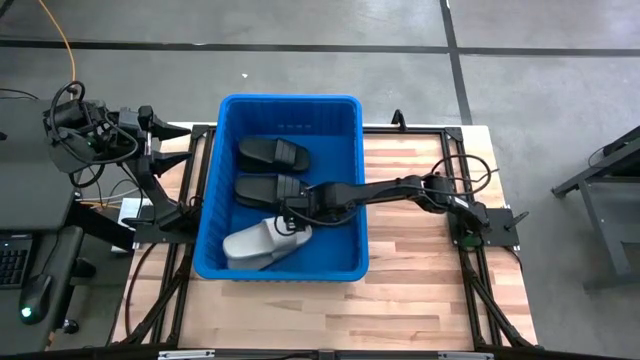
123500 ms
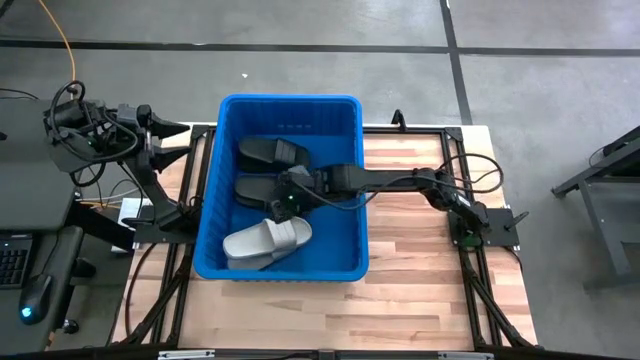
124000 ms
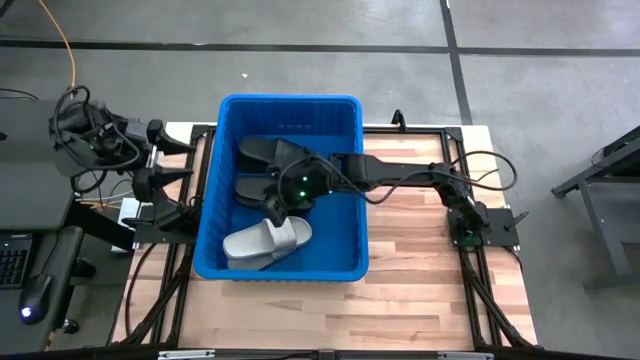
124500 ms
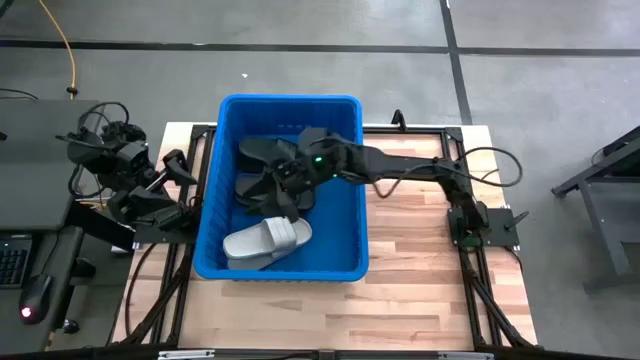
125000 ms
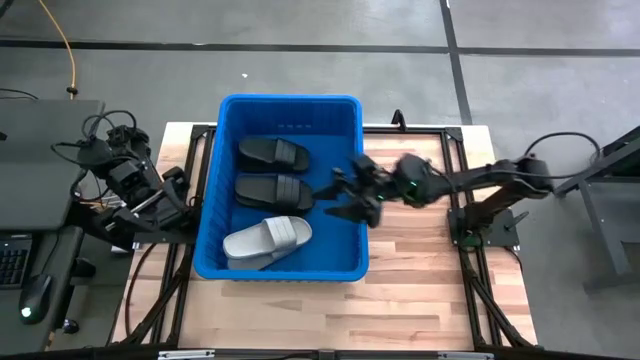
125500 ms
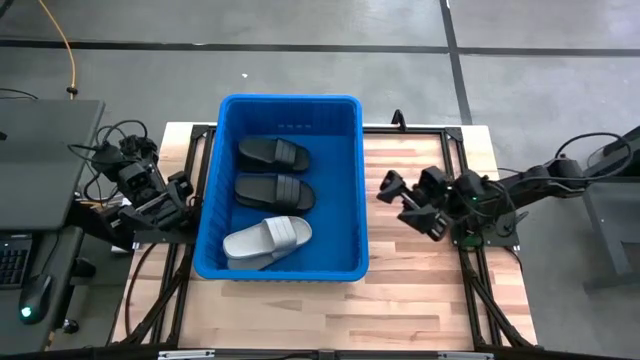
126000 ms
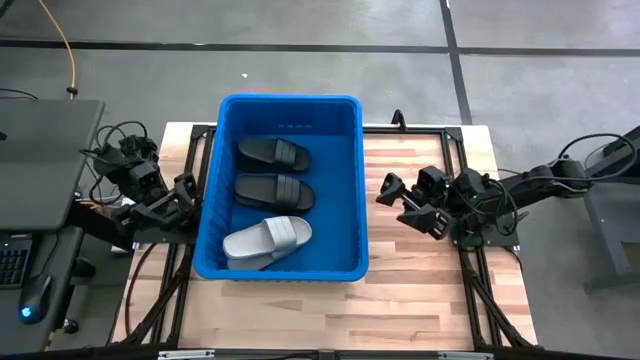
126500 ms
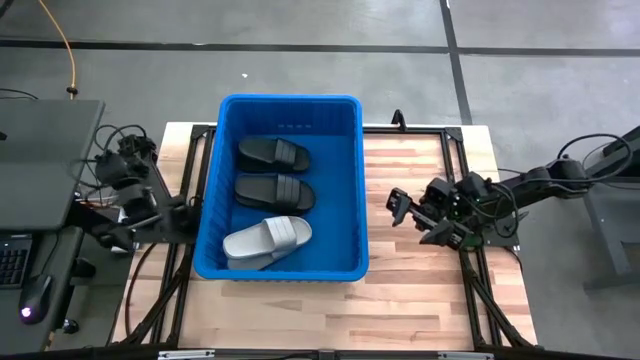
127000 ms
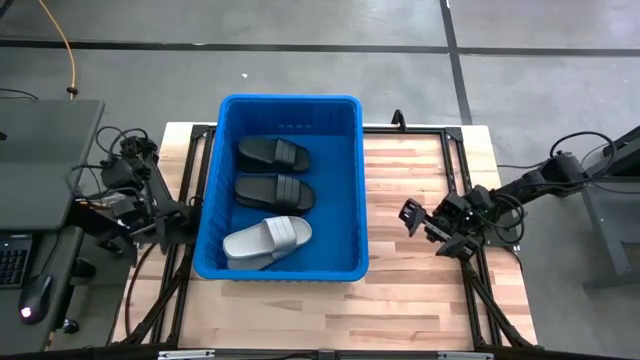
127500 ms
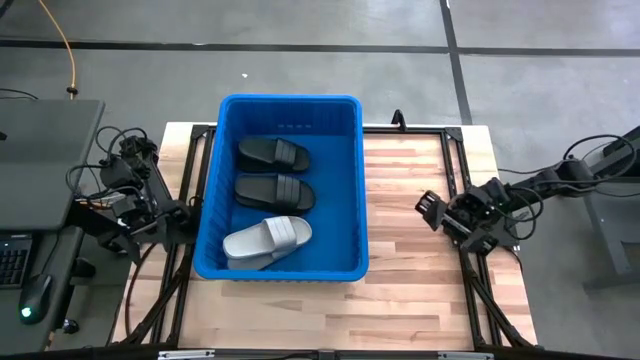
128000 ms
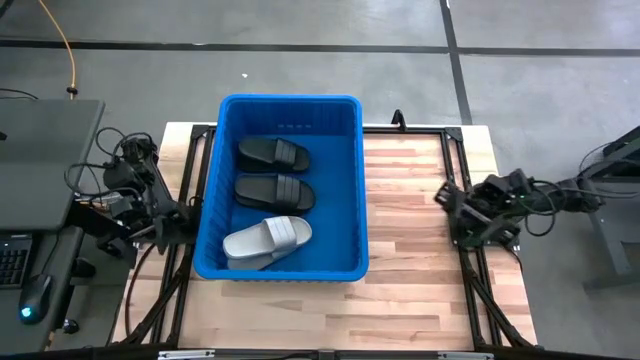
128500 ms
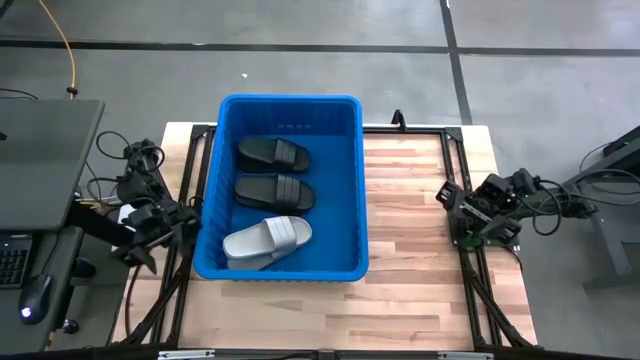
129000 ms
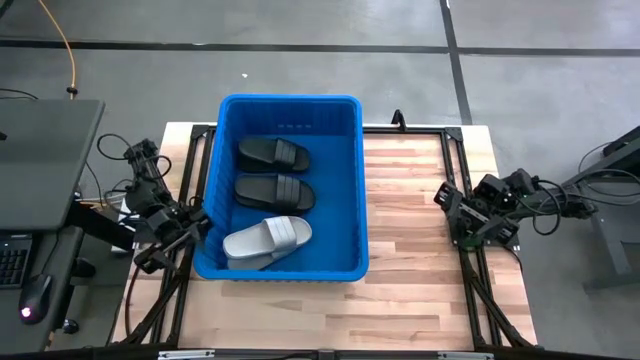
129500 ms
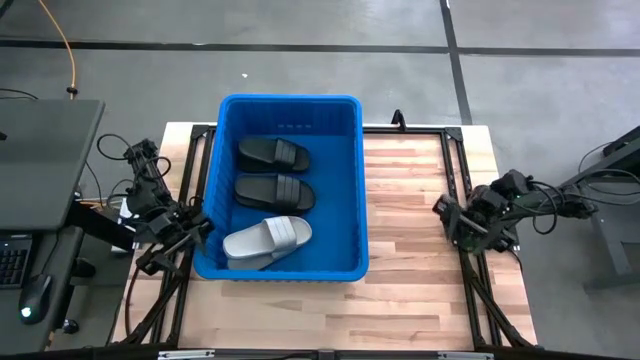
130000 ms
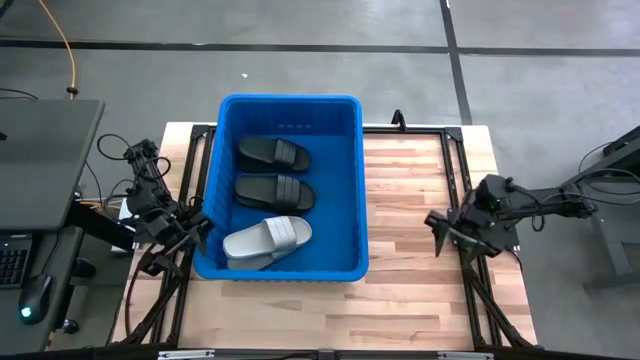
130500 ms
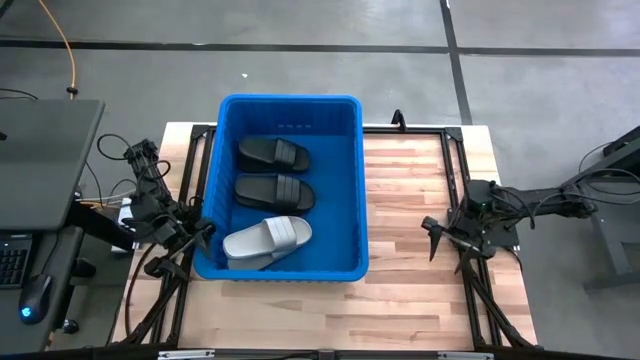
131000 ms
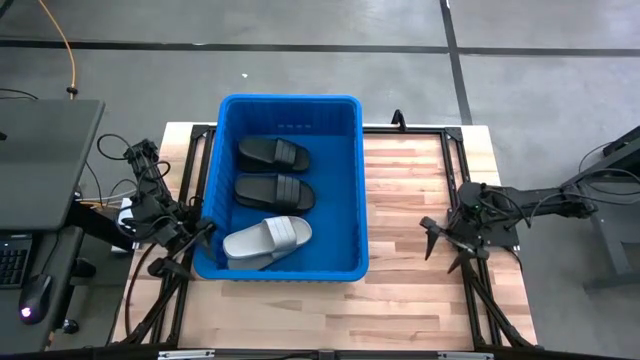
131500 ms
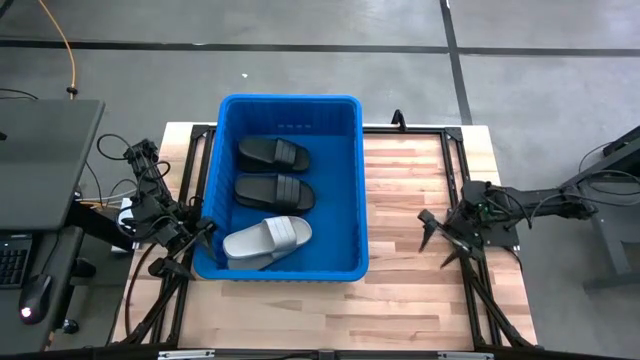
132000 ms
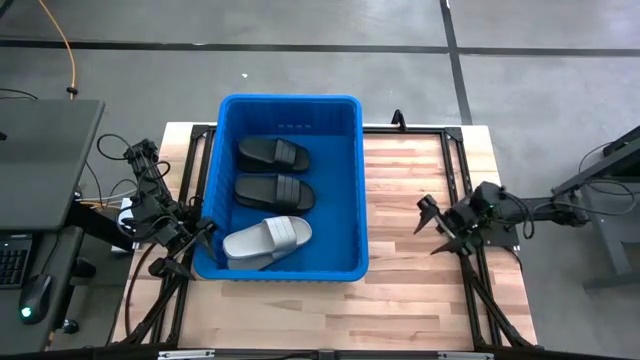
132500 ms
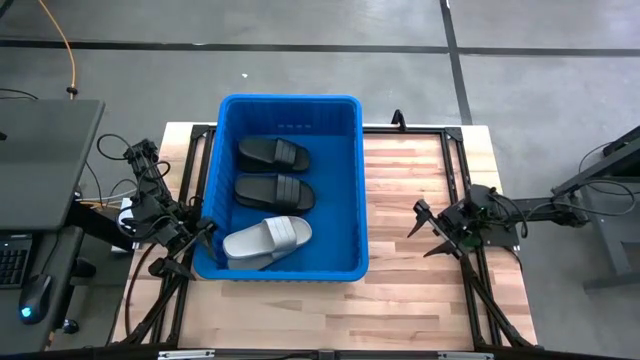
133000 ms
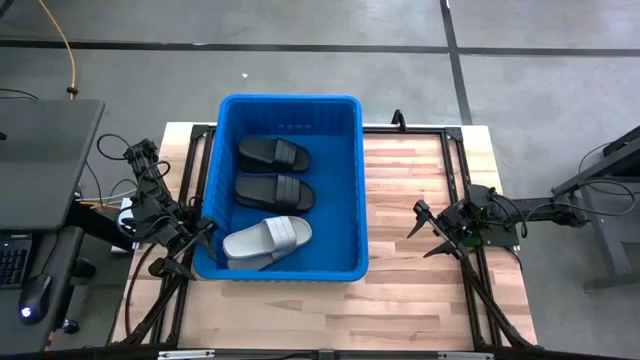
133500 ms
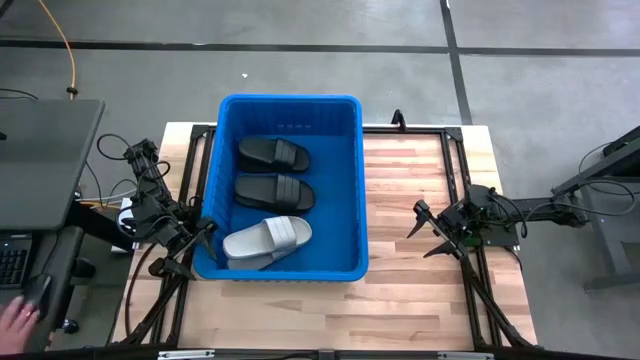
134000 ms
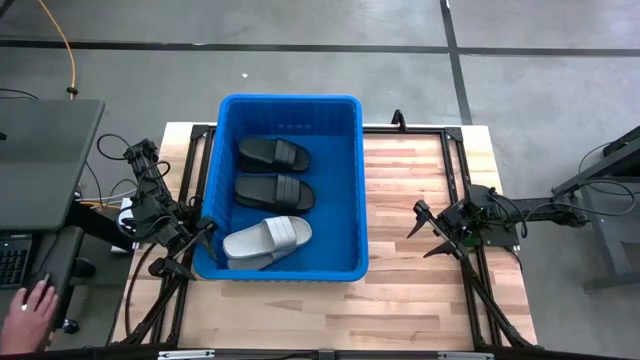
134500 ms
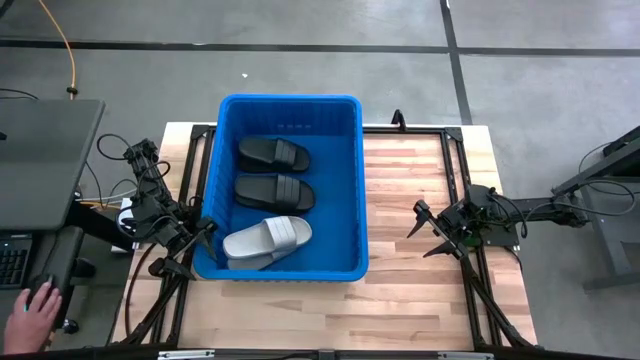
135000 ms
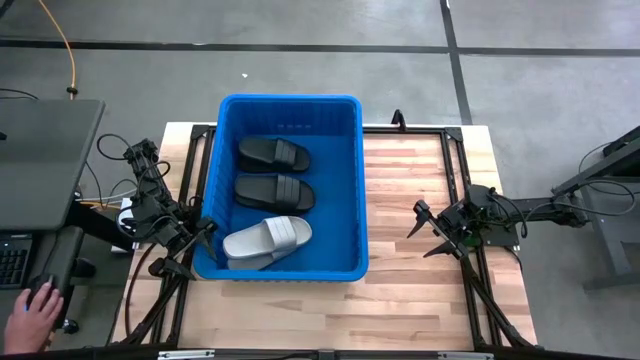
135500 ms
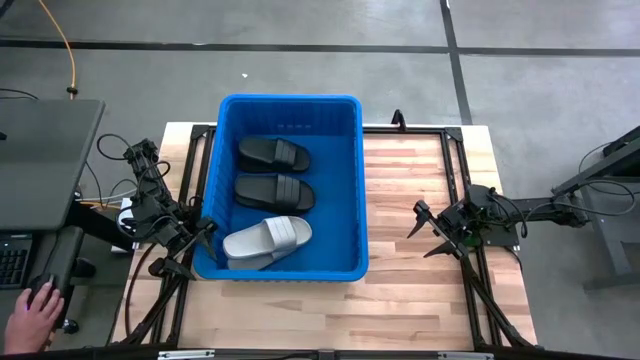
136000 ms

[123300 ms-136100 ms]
Task: Pick and place slides into bin
Return to Home Position

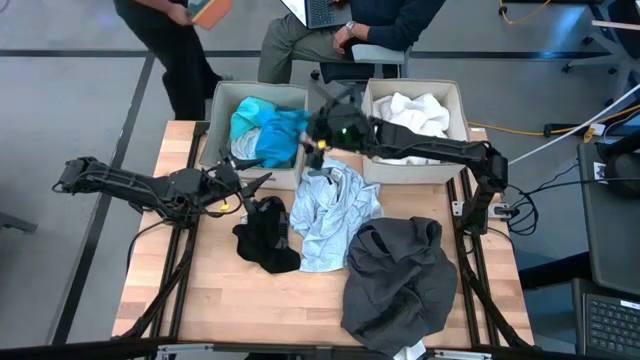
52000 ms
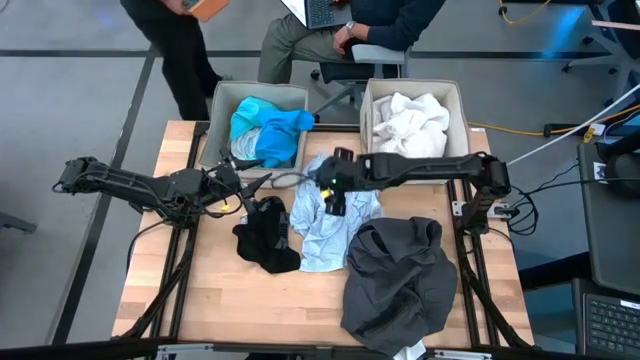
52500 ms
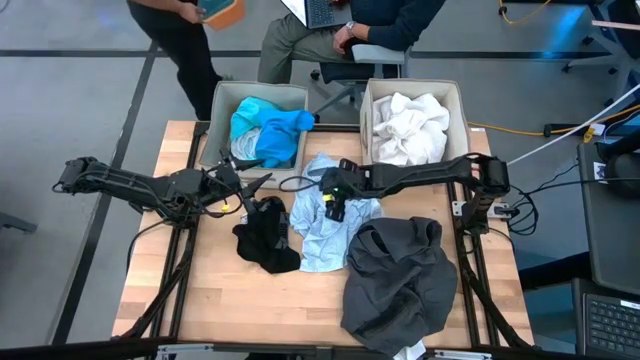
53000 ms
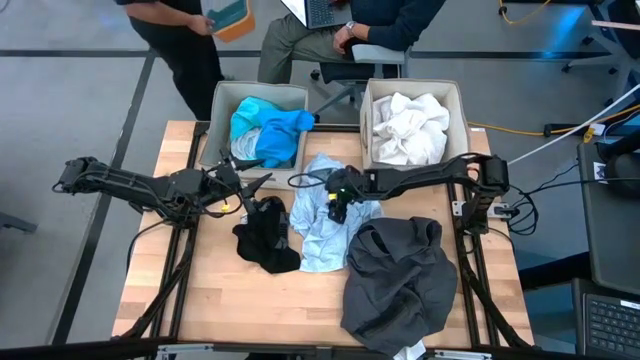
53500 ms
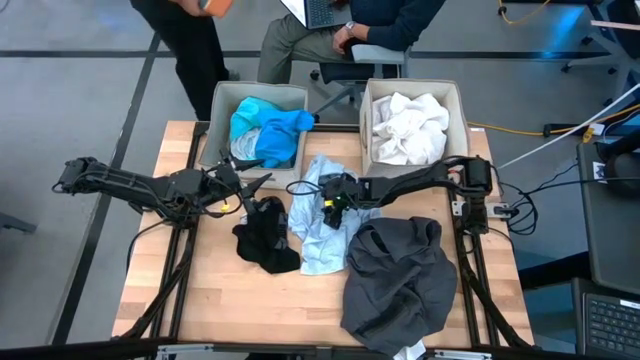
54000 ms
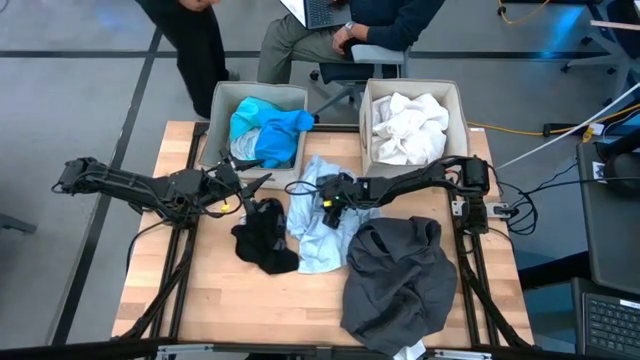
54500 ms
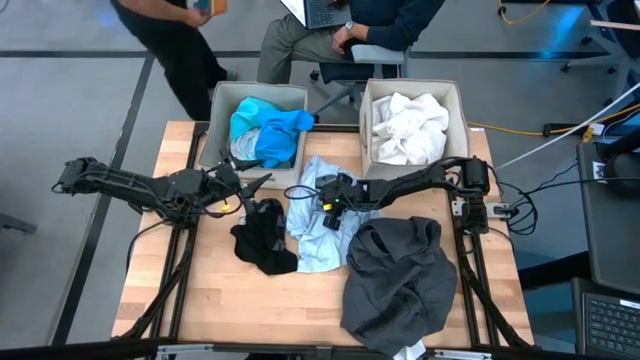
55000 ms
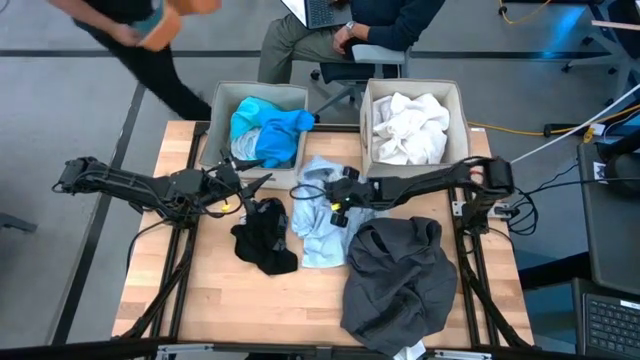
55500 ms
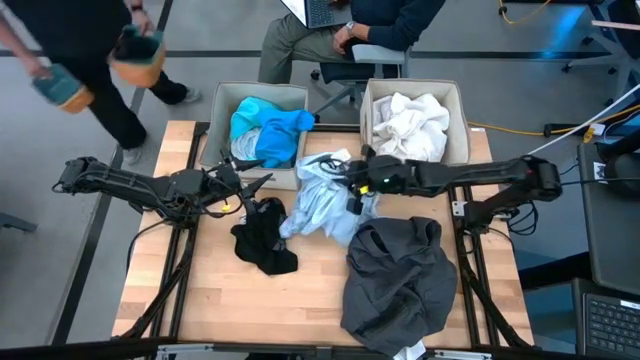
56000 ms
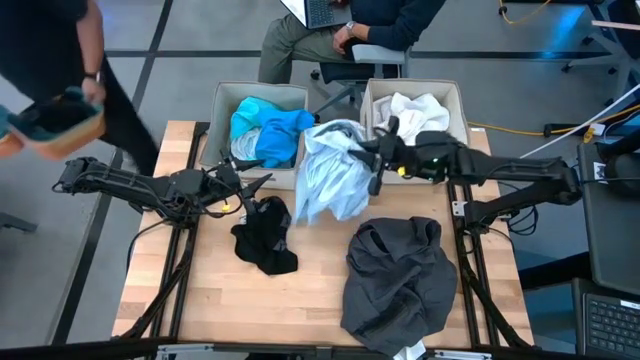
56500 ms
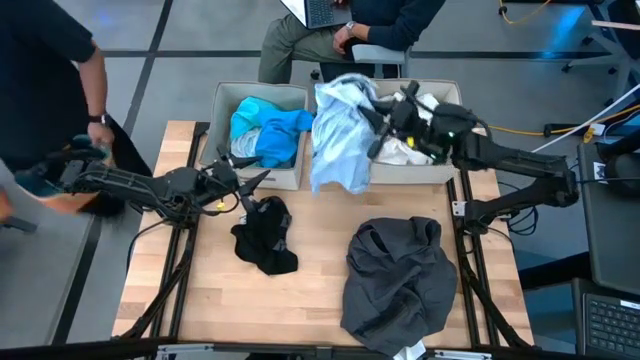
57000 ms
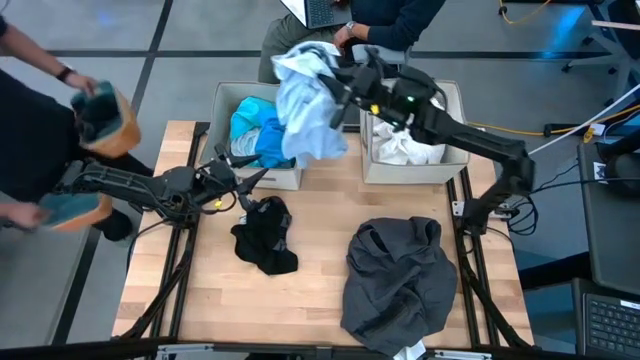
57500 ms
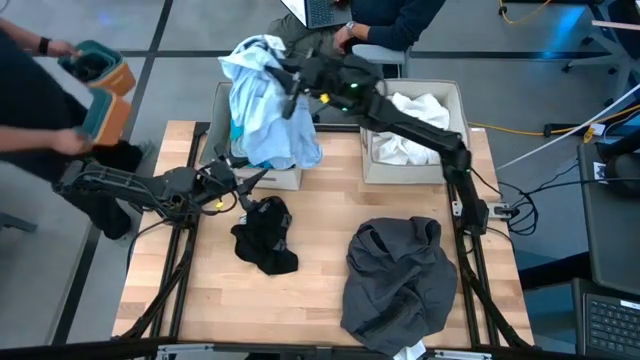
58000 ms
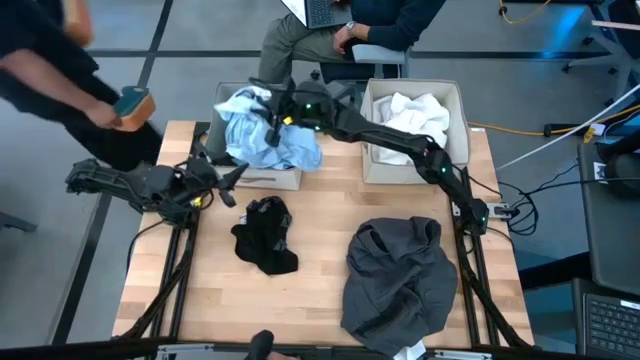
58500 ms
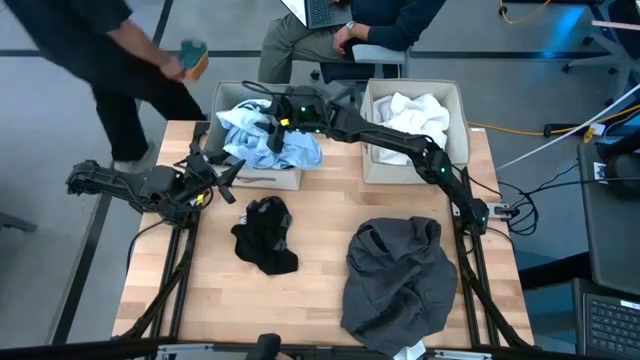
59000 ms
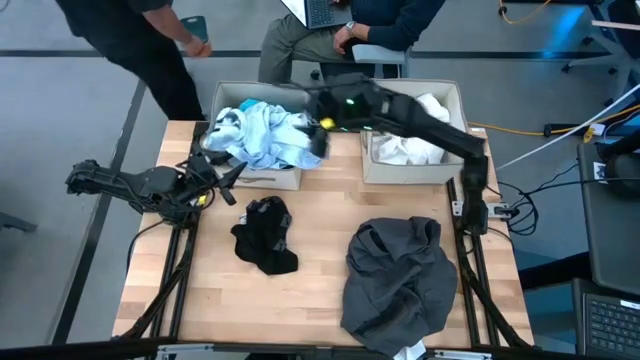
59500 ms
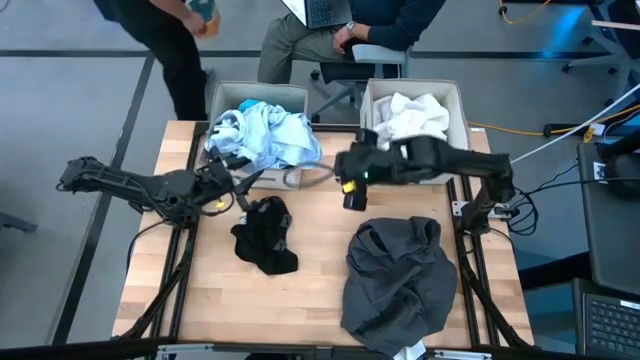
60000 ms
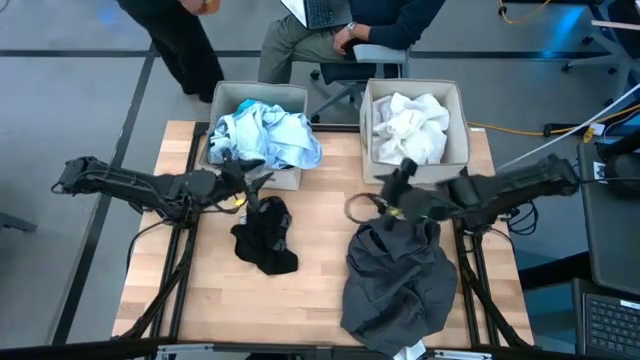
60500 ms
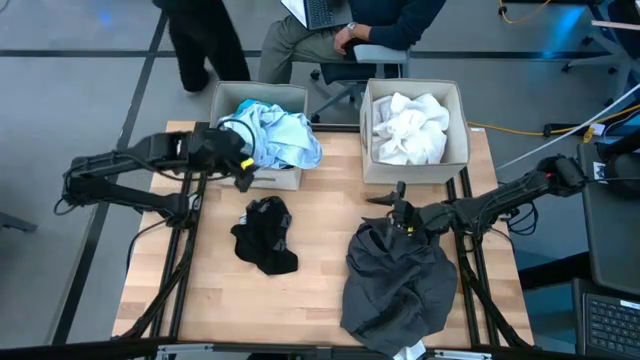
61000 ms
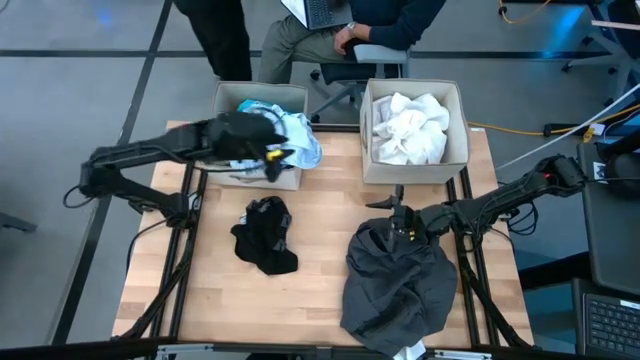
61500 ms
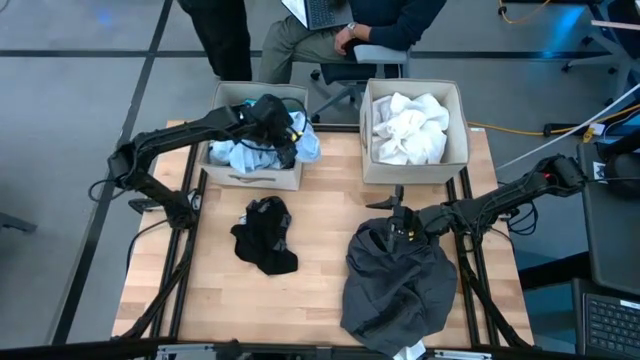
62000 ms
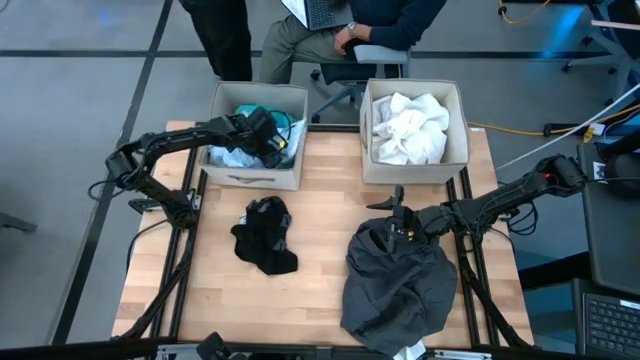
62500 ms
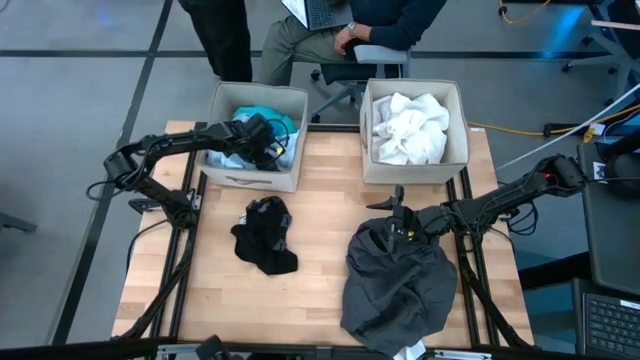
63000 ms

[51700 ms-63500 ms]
Task: Sort clothes
Put the gray polo shirt into the left laundry organizer
